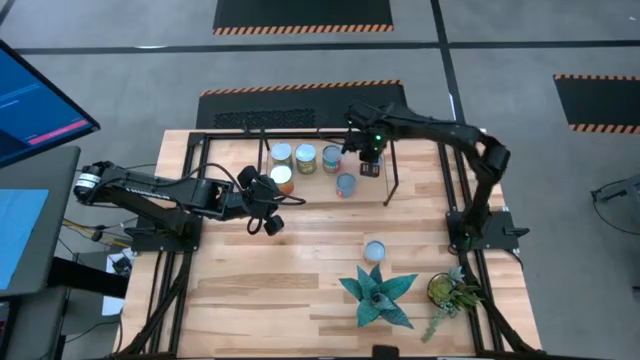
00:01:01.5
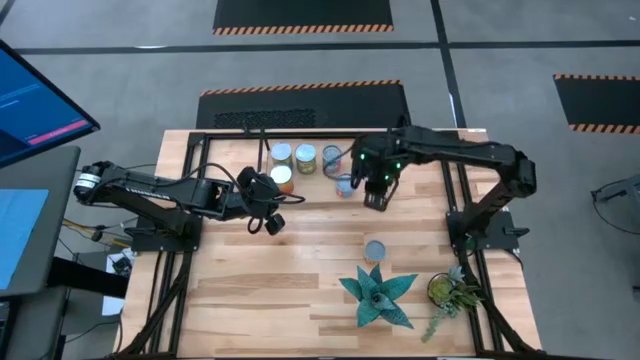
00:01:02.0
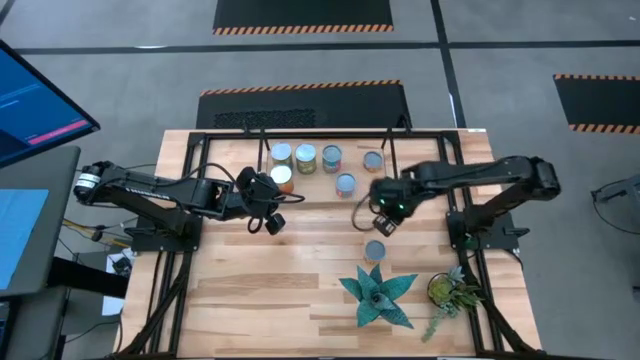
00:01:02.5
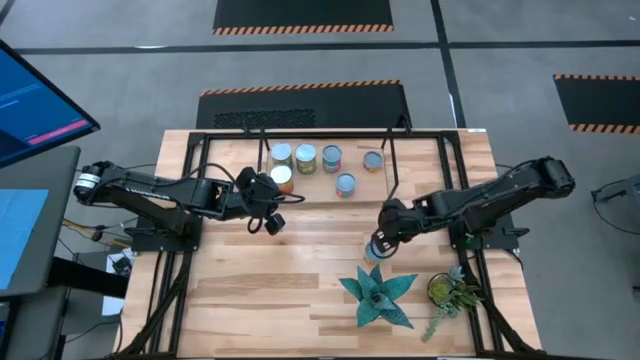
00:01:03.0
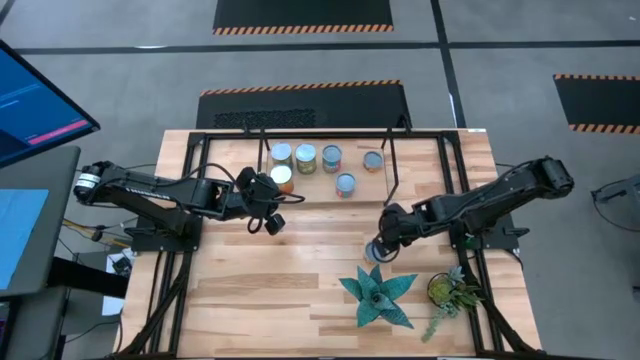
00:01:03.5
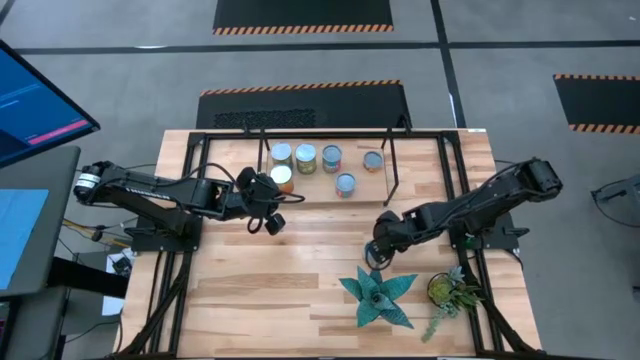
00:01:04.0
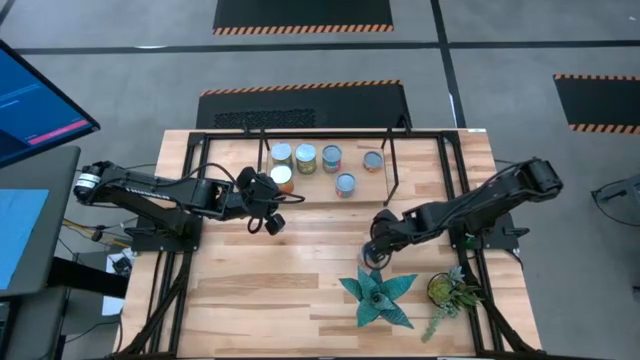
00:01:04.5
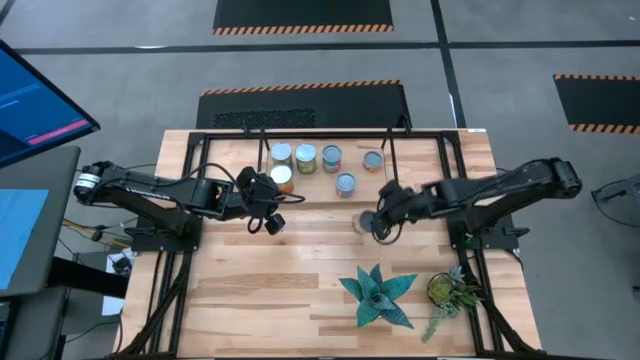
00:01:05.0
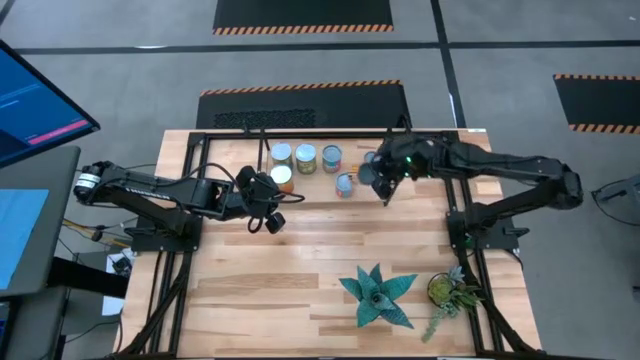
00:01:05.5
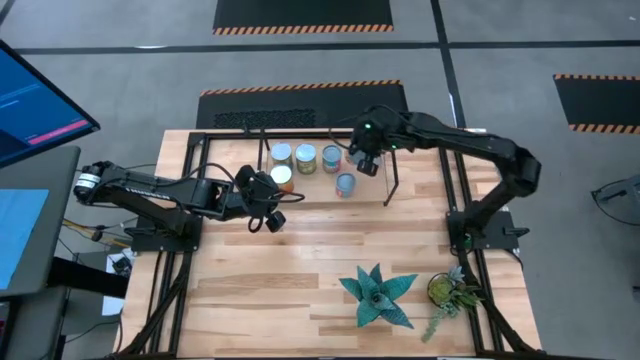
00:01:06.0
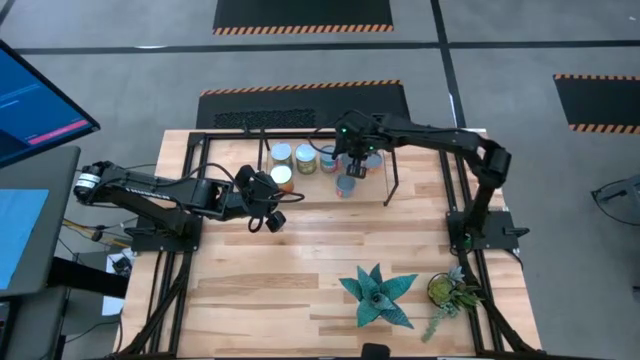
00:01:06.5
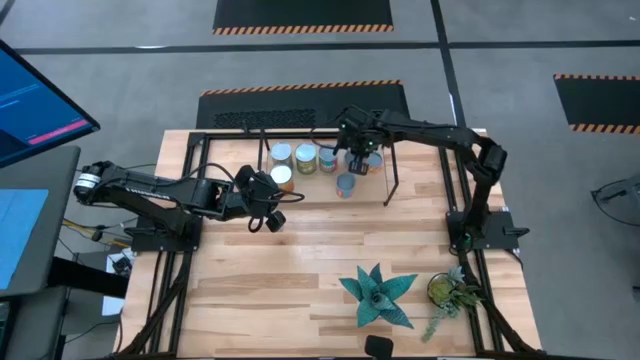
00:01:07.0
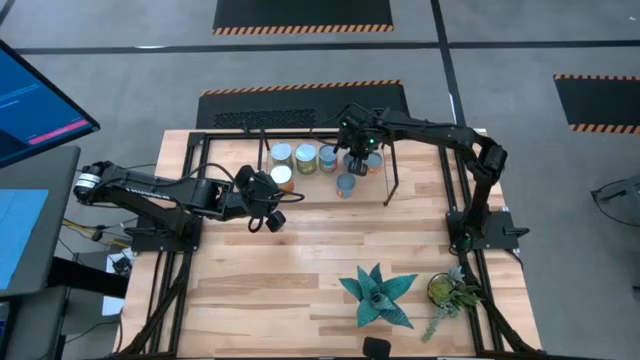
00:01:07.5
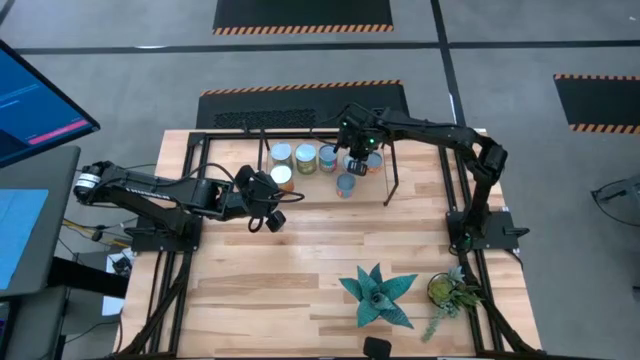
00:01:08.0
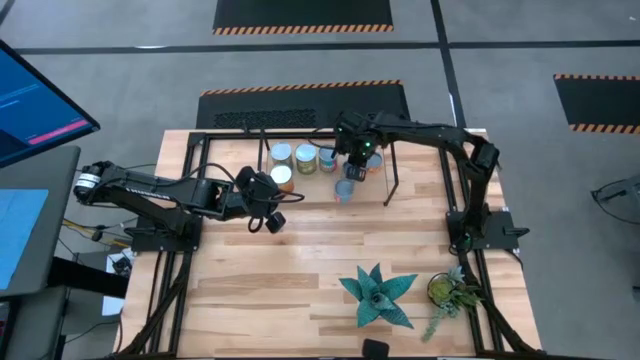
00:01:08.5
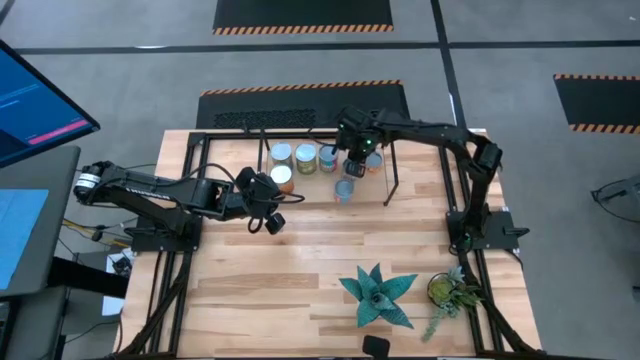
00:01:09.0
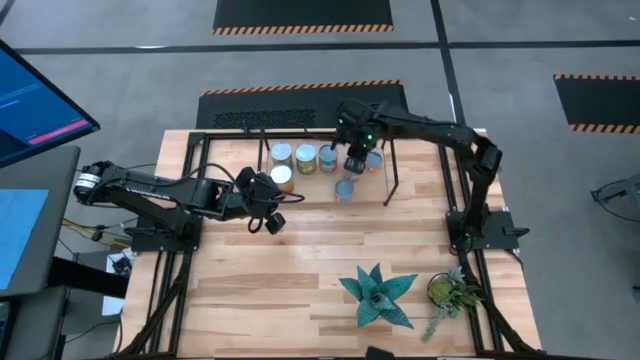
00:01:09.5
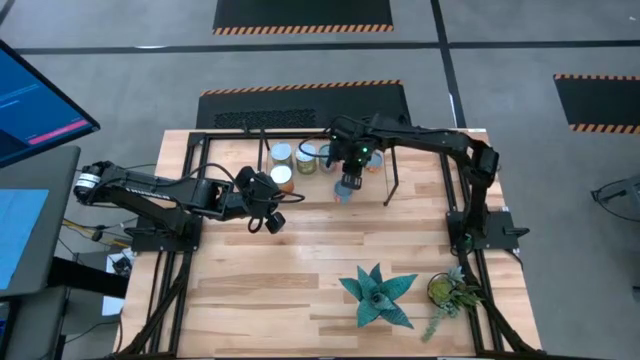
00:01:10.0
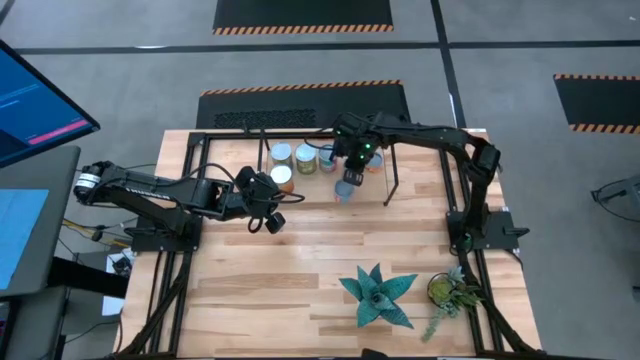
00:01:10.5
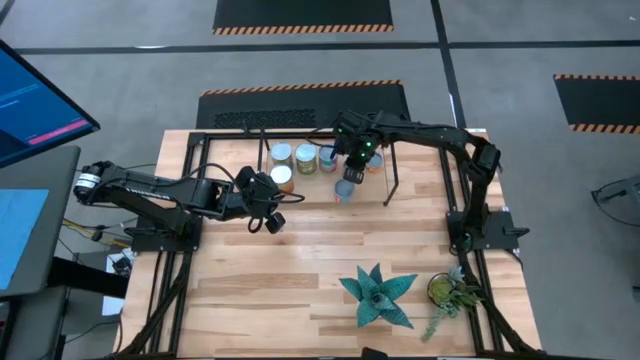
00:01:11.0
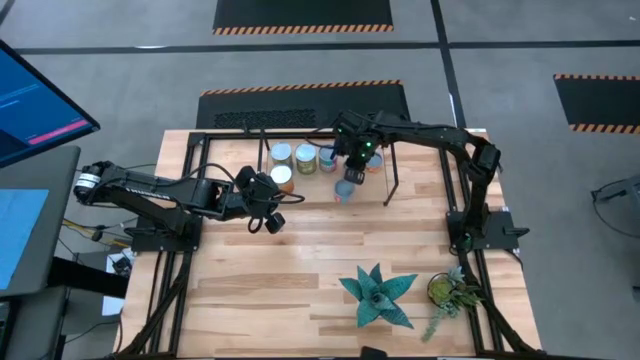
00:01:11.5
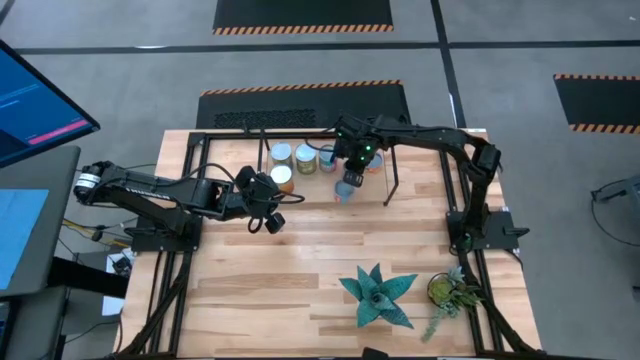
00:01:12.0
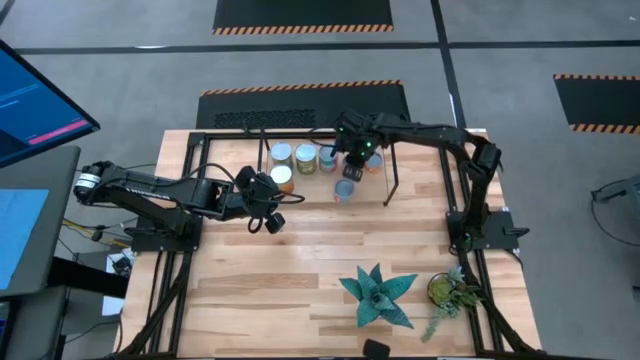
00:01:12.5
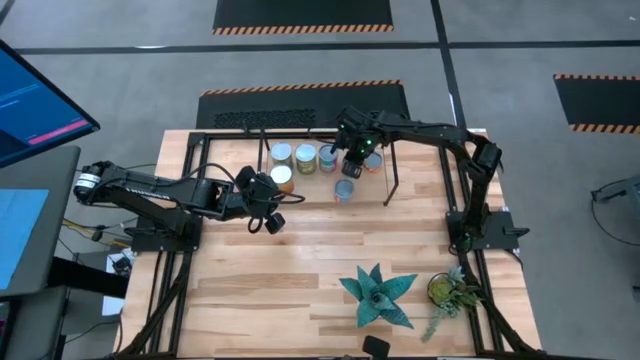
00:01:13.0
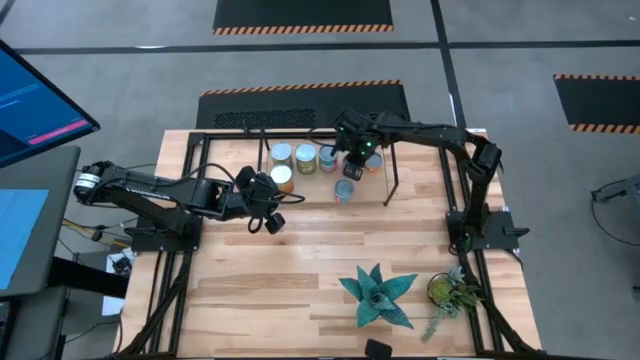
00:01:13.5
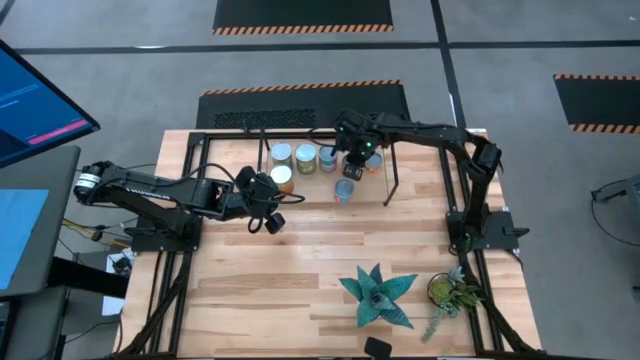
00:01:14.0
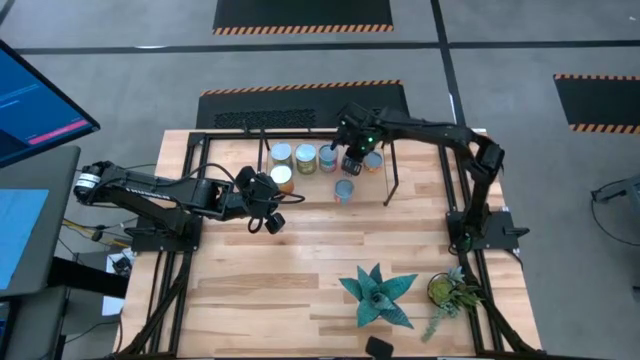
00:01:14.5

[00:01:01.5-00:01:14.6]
Task: Pick and place cans onto a shelf
Put the canned spicy black beans on the shelf

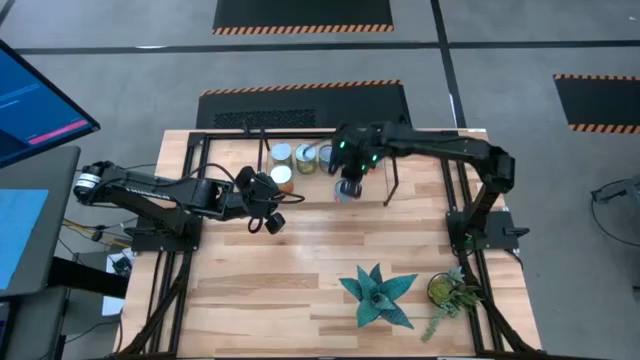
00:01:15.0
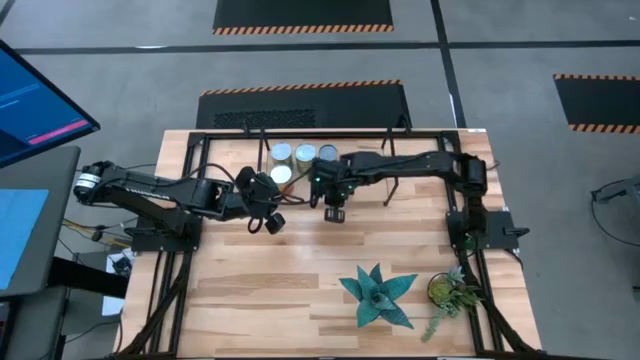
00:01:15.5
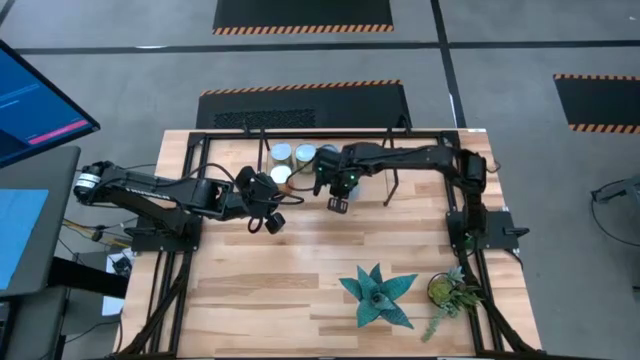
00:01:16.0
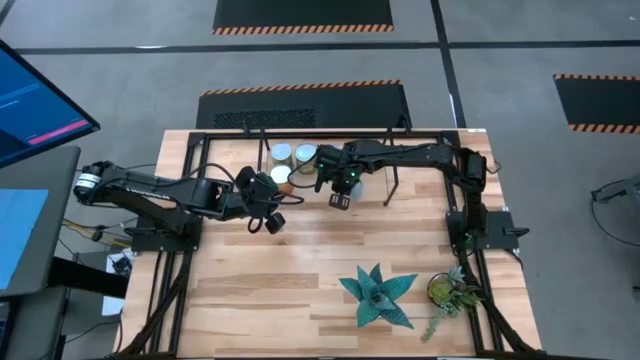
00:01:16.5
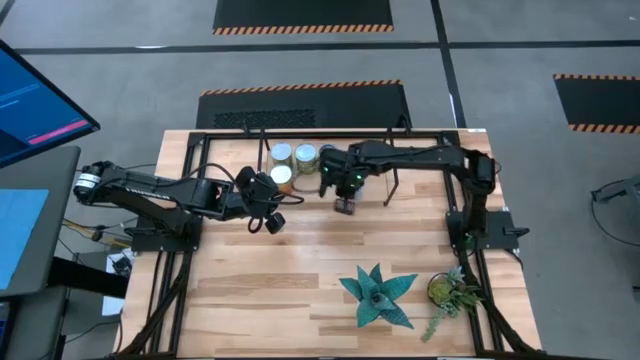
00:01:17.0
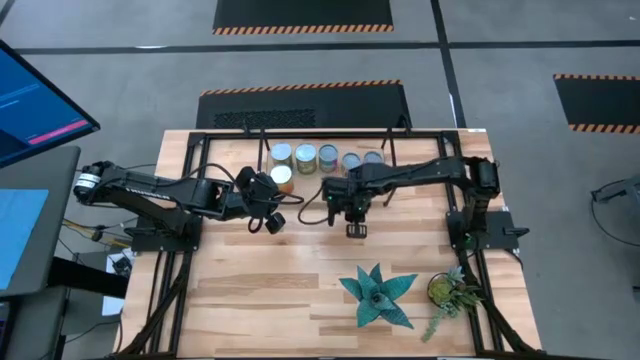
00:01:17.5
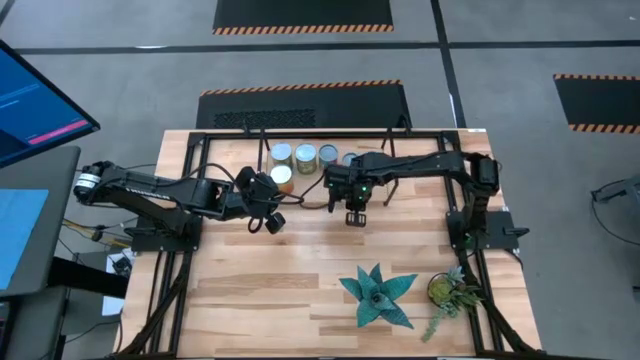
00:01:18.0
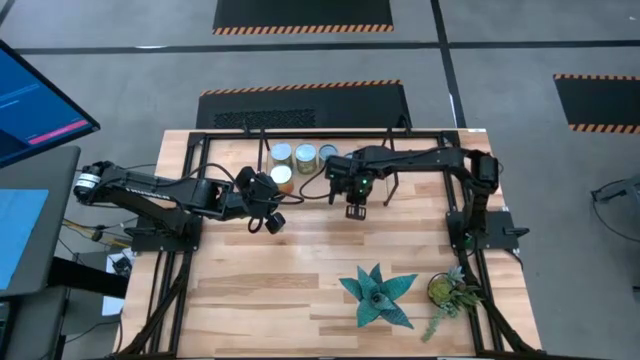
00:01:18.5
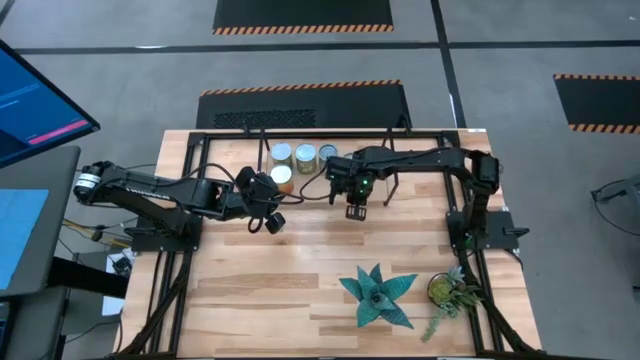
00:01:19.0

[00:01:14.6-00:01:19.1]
Adjust the canned corn on the shelf

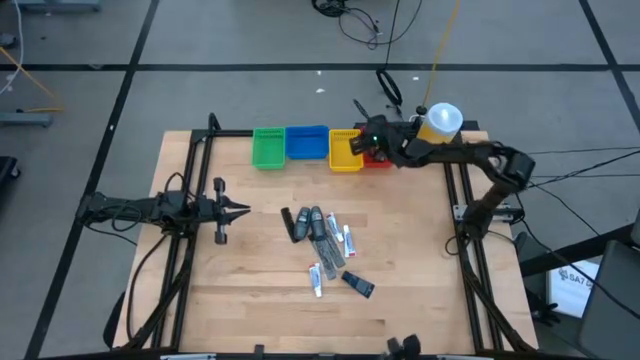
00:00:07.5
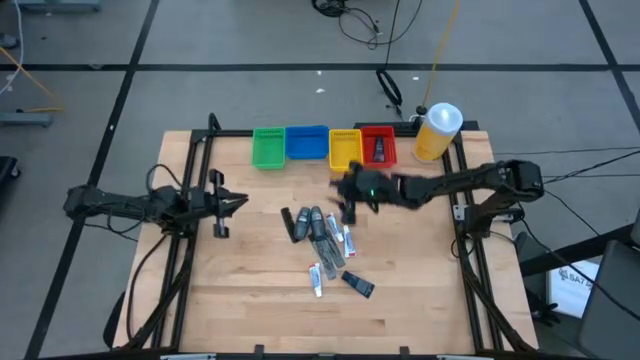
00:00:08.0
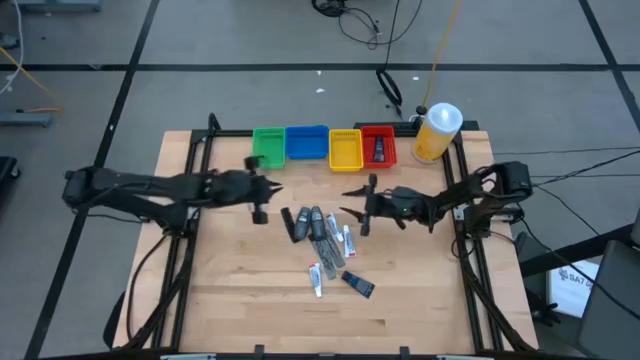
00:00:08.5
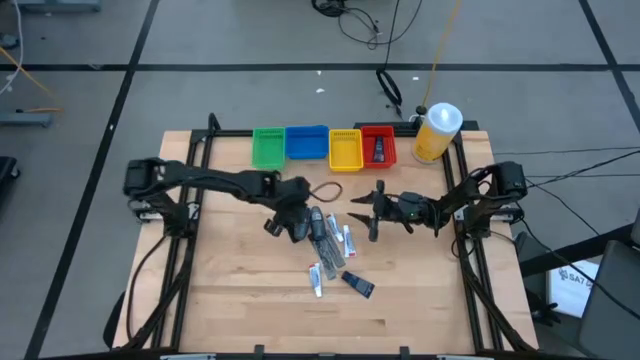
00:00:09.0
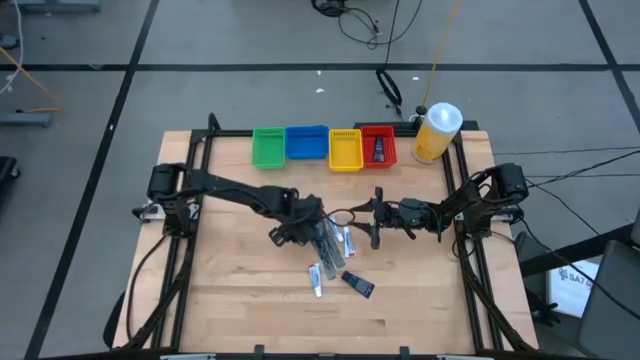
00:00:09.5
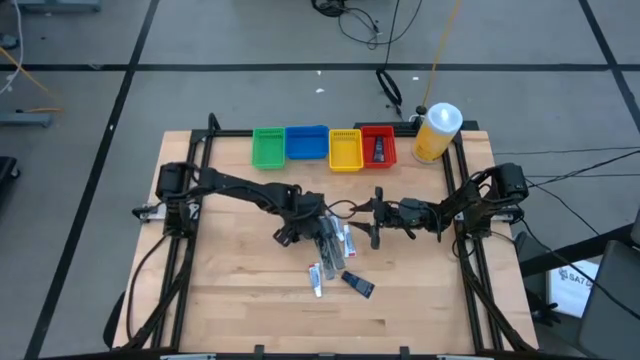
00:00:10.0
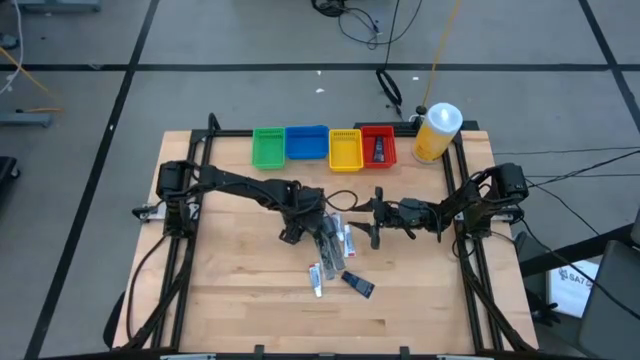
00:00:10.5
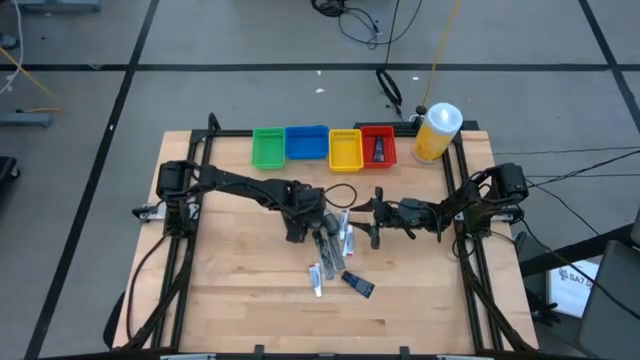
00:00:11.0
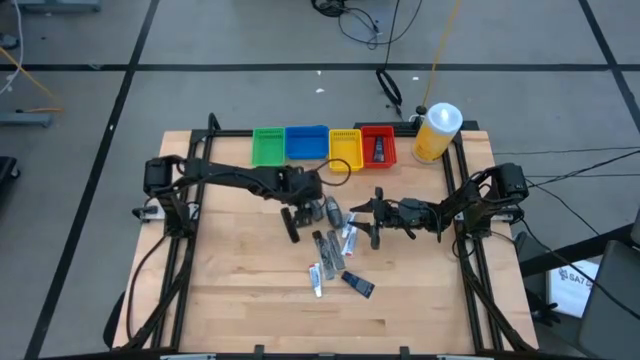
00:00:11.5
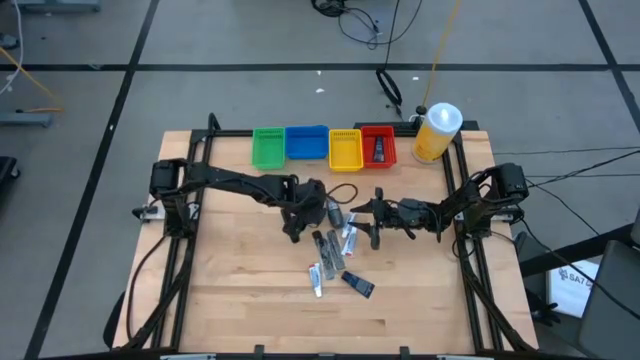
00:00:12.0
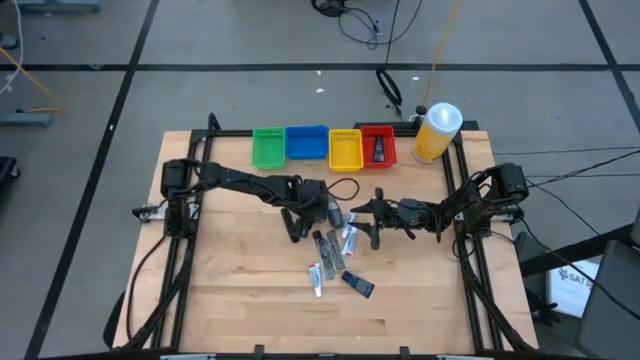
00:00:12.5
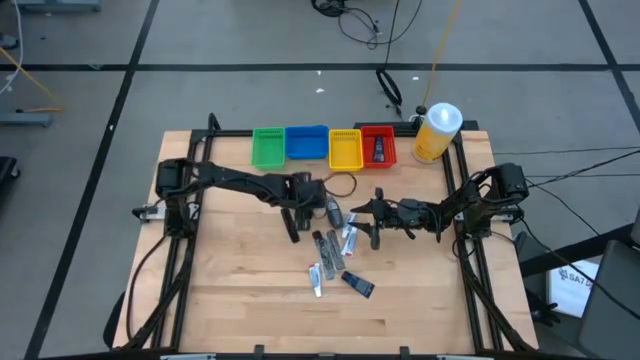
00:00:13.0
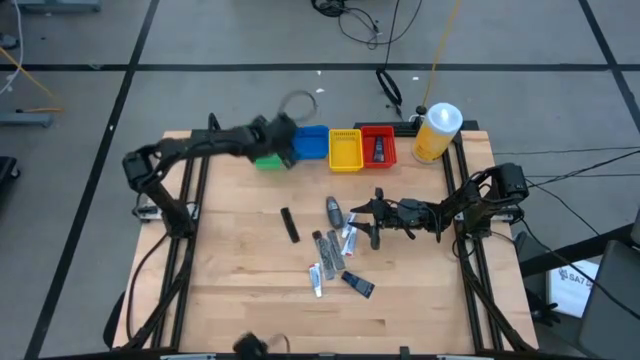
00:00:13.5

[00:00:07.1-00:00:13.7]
Task: Pick & Place Travel size toiletries
Put the left black deodorant into the green bin
